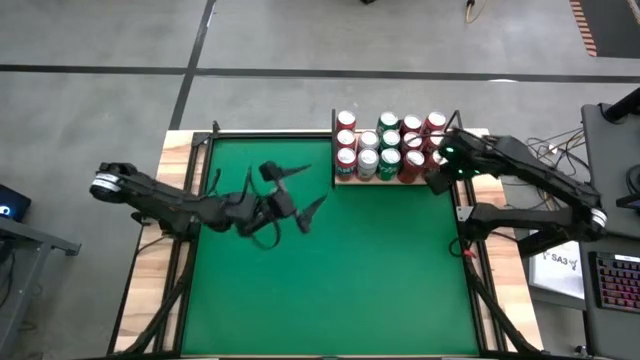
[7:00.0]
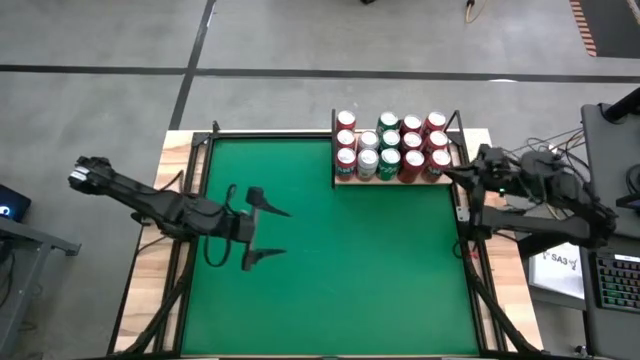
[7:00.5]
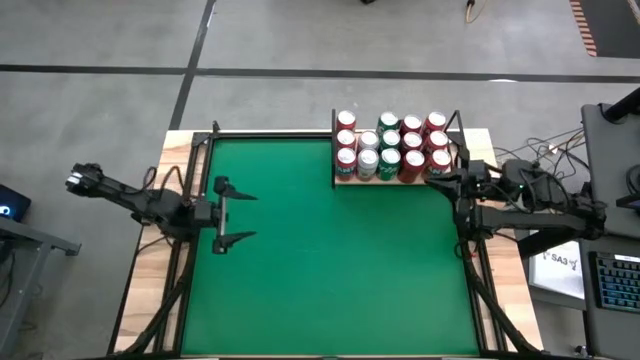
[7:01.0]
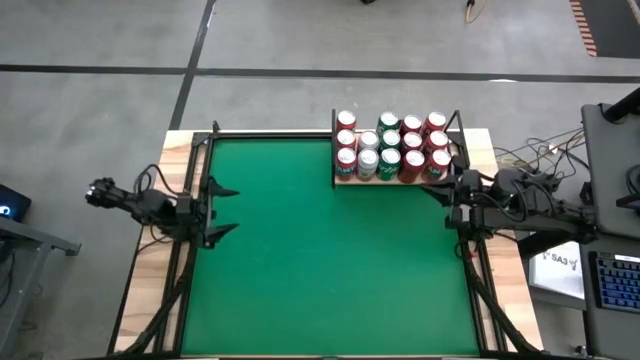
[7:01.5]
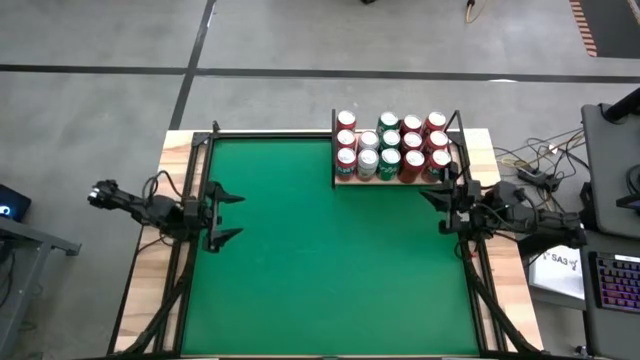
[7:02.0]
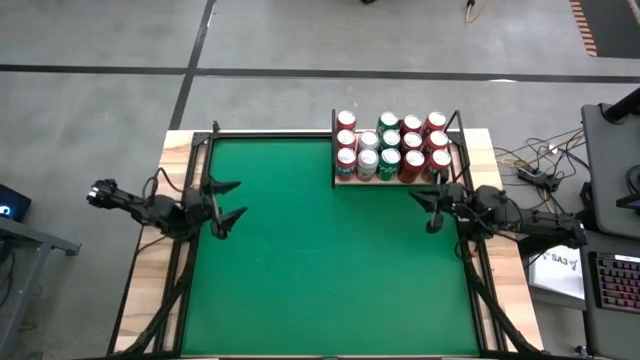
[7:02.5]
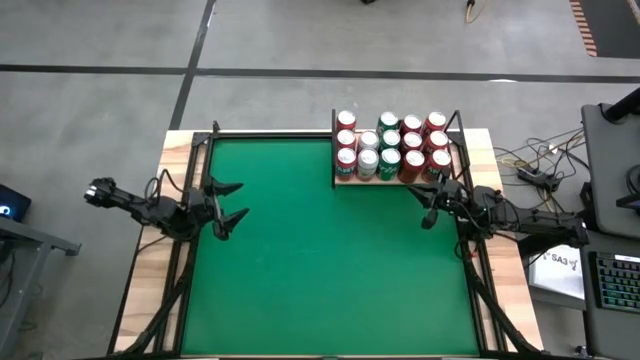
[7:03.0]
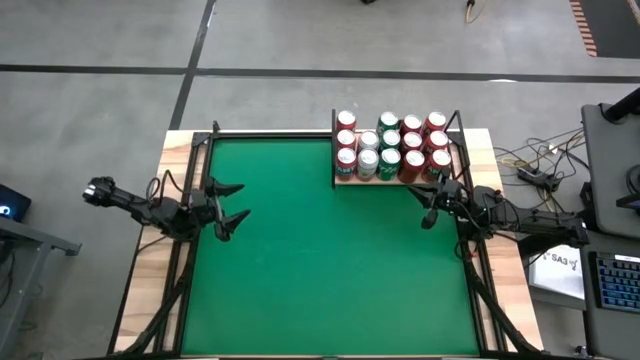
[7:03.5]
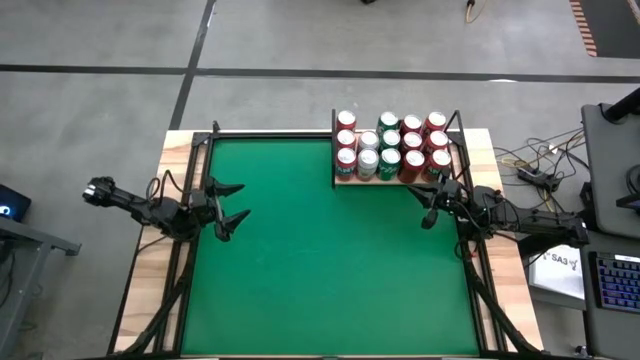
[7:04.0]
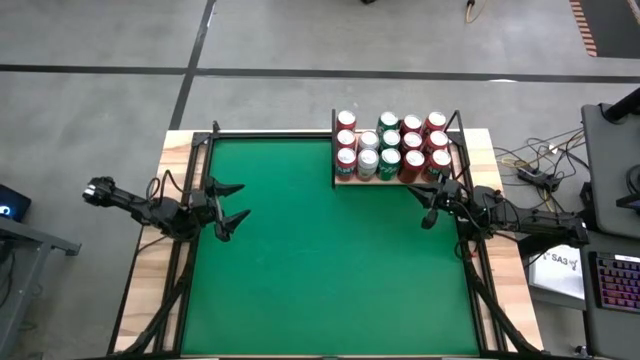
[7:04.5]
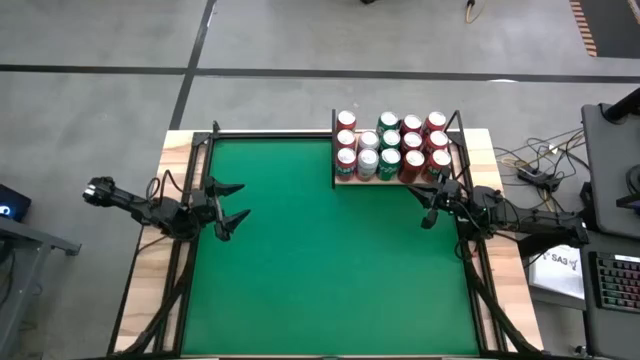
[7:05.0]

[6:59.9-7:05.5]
Task: Place canned beverage on shelf
Return to Home Position

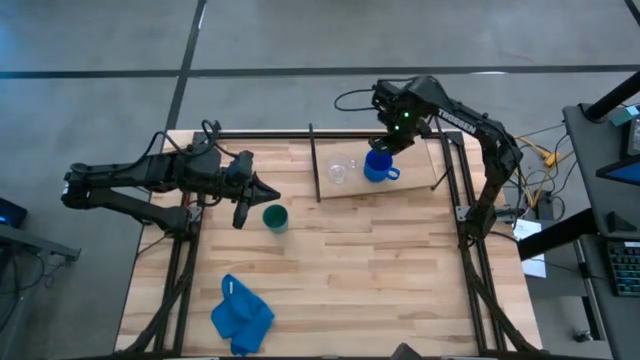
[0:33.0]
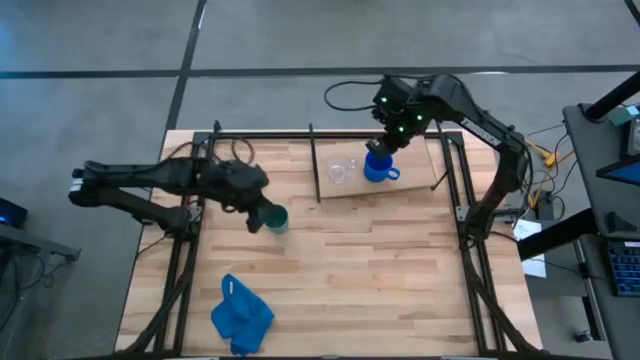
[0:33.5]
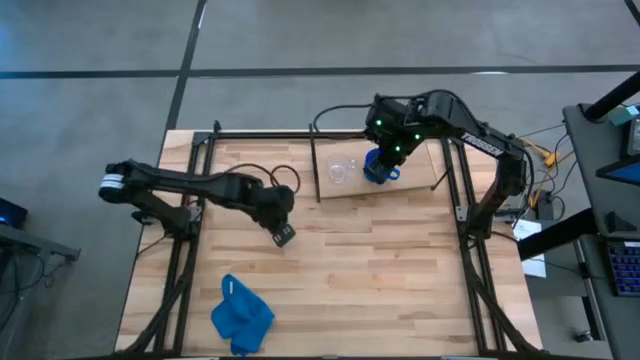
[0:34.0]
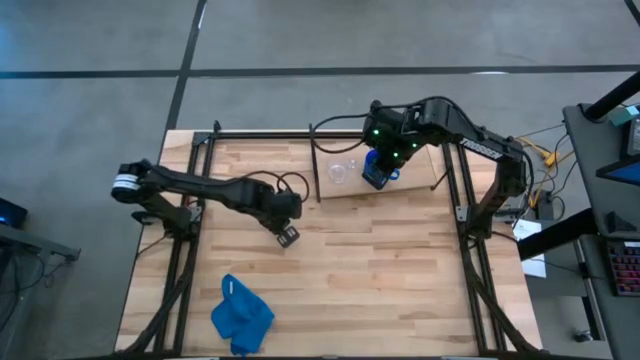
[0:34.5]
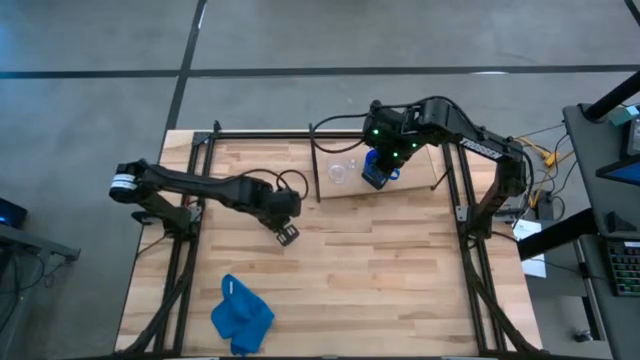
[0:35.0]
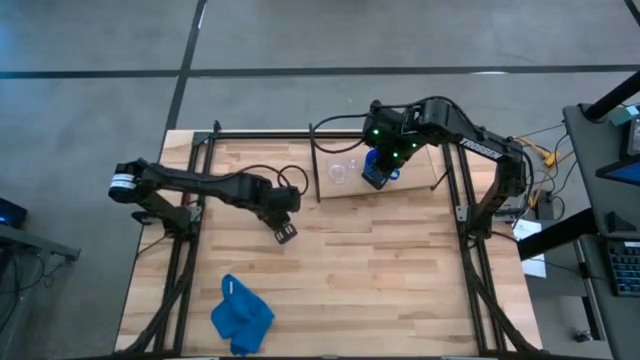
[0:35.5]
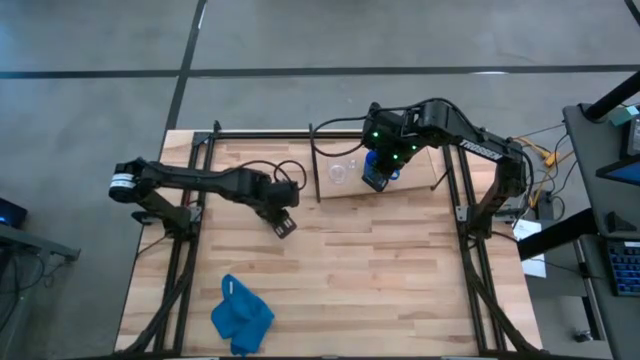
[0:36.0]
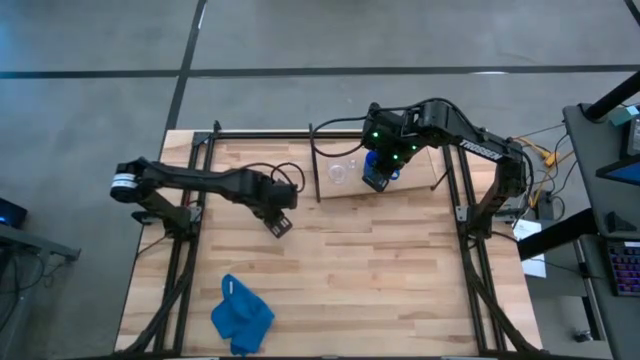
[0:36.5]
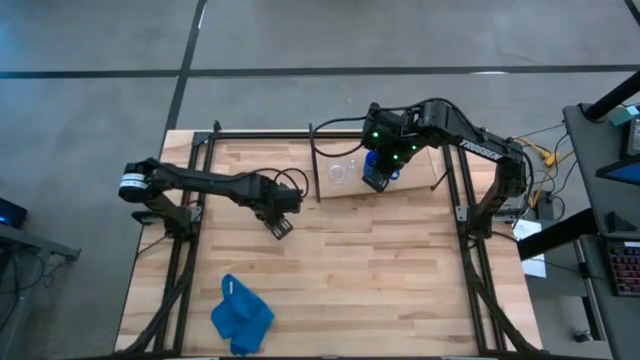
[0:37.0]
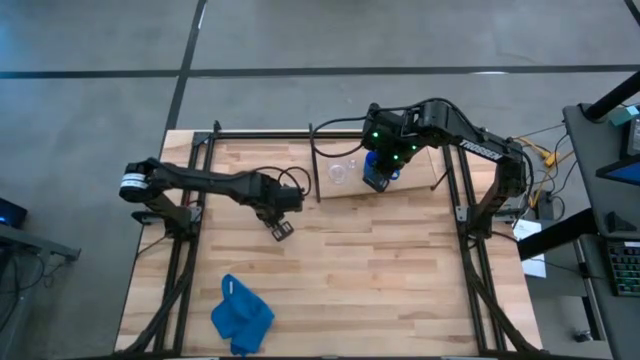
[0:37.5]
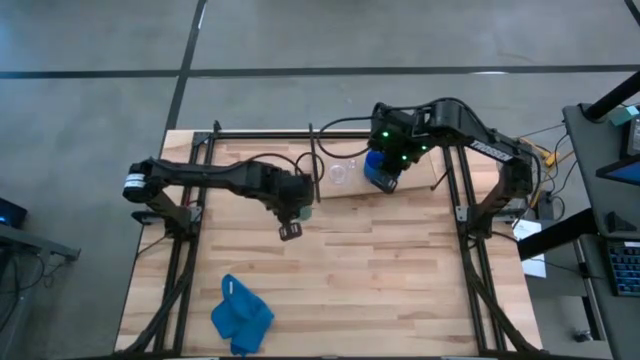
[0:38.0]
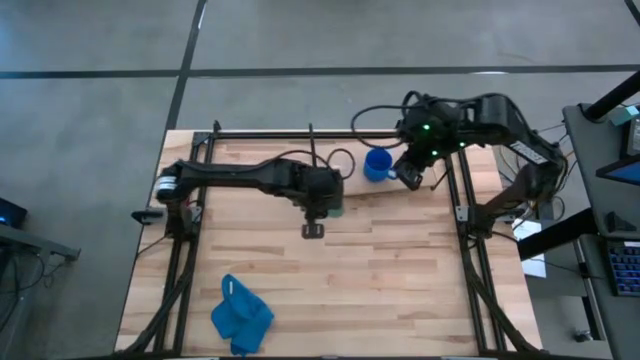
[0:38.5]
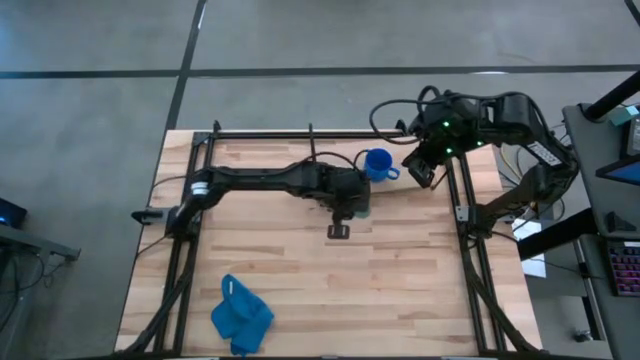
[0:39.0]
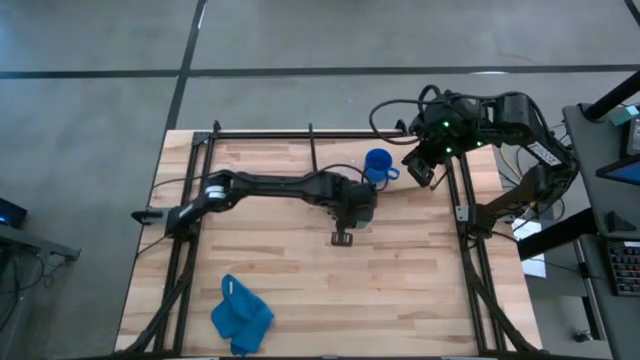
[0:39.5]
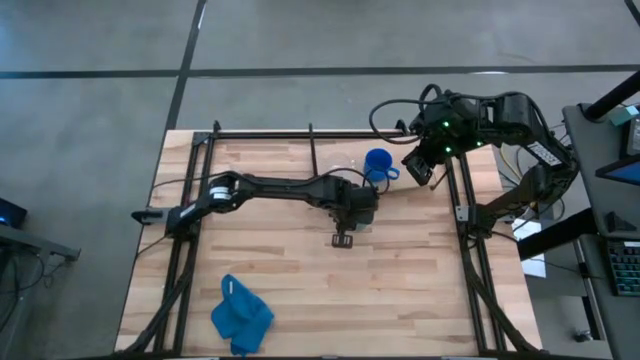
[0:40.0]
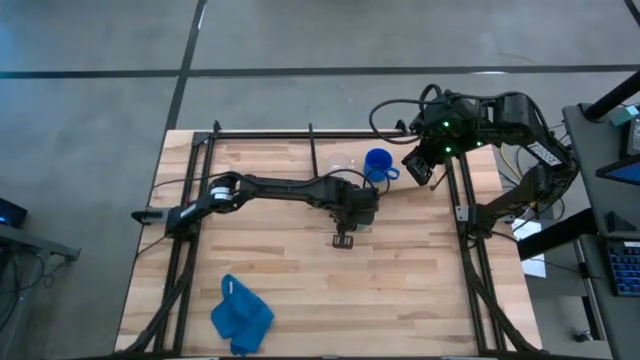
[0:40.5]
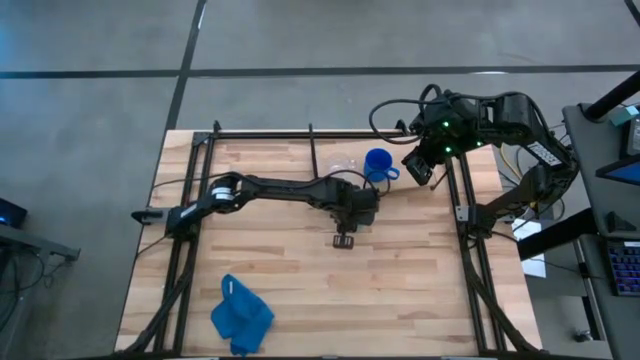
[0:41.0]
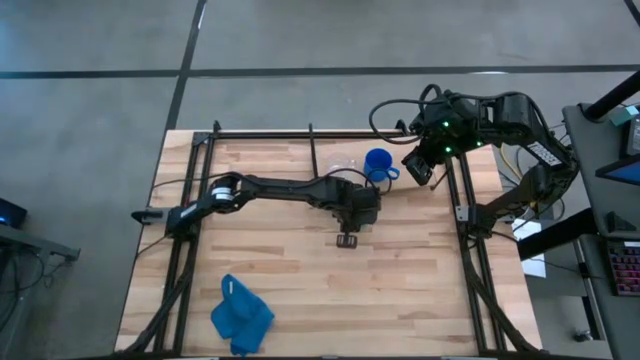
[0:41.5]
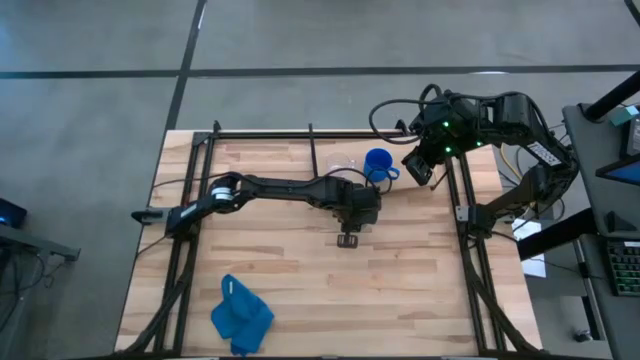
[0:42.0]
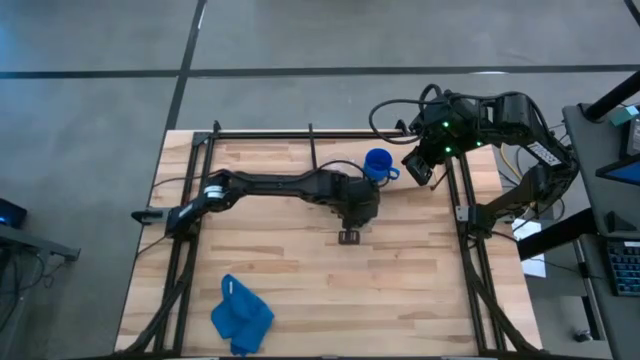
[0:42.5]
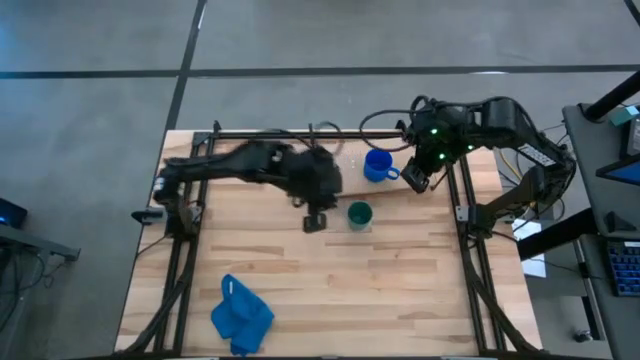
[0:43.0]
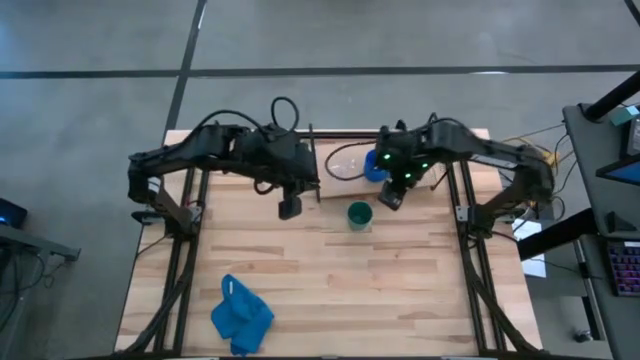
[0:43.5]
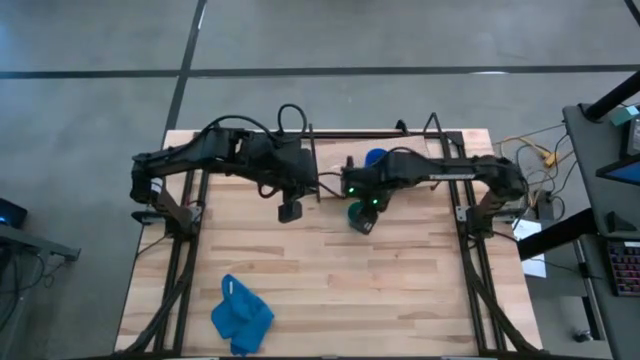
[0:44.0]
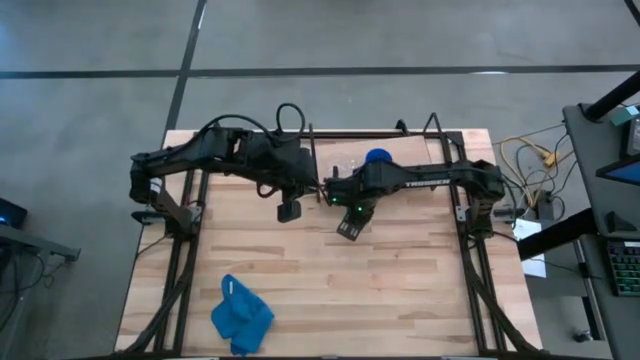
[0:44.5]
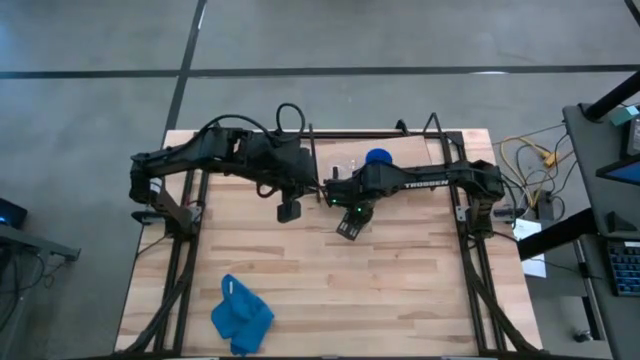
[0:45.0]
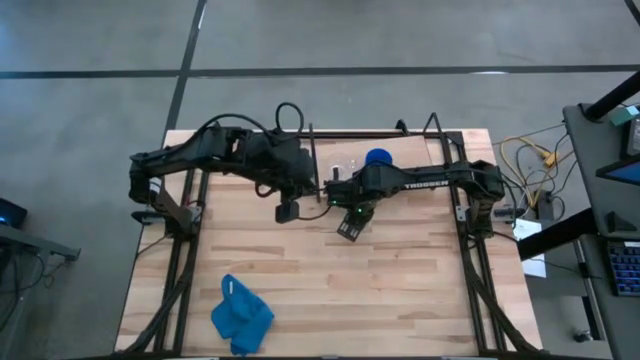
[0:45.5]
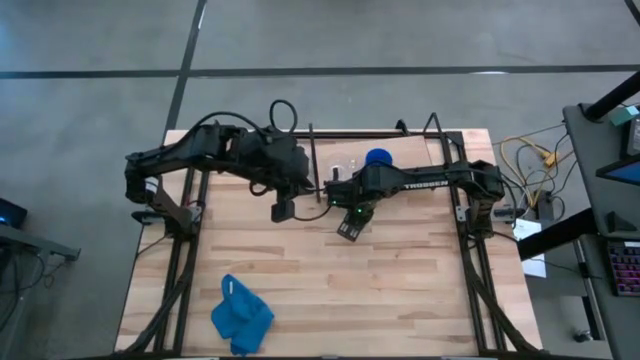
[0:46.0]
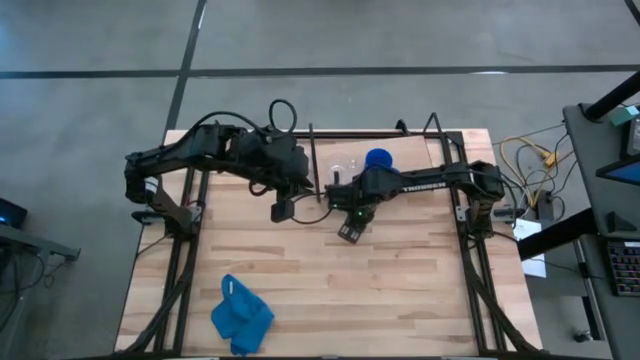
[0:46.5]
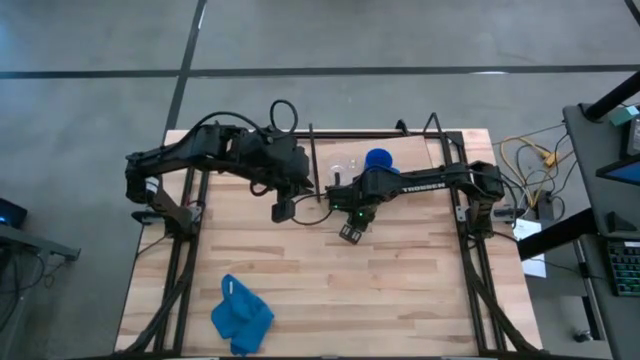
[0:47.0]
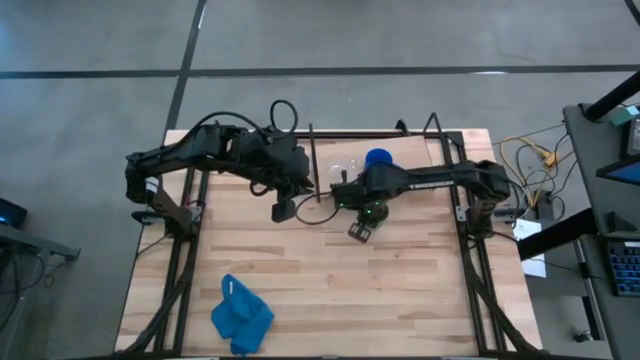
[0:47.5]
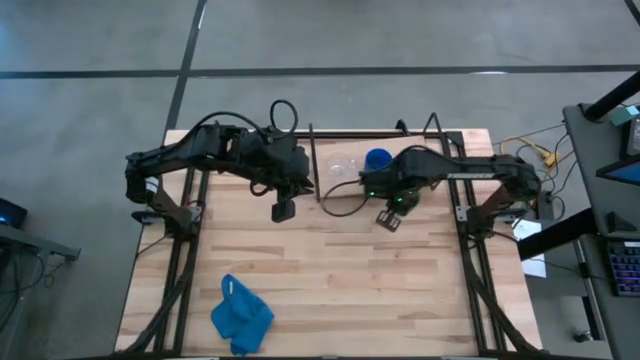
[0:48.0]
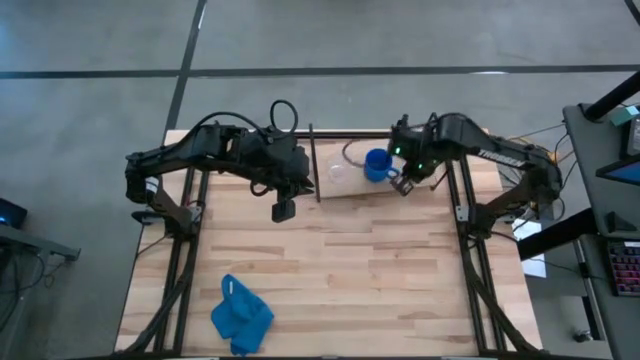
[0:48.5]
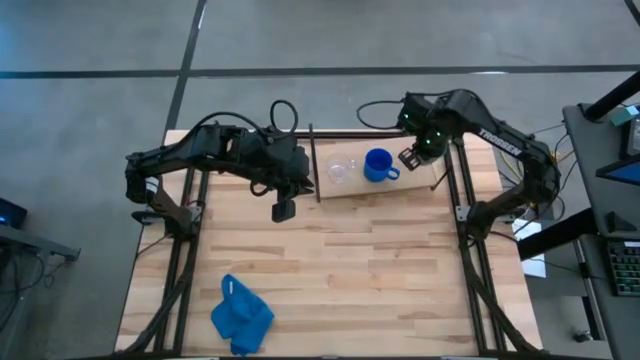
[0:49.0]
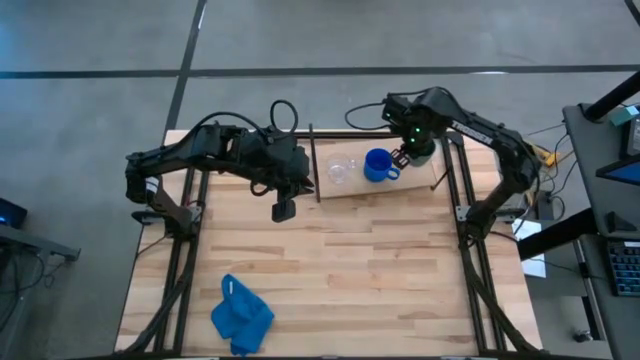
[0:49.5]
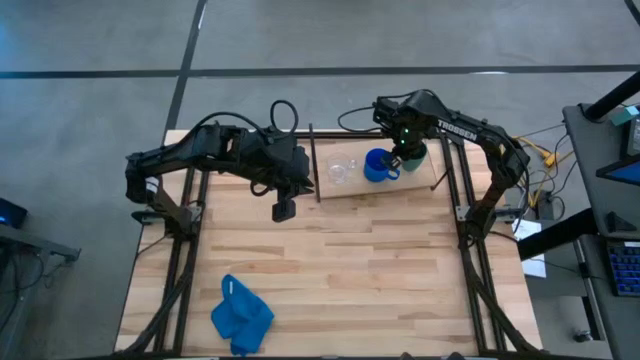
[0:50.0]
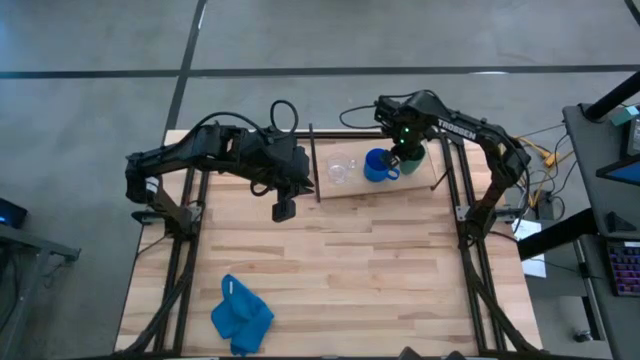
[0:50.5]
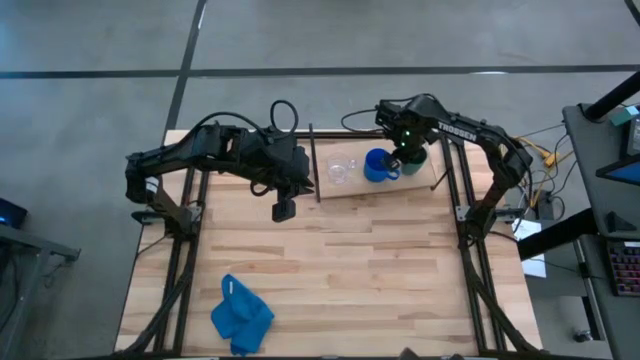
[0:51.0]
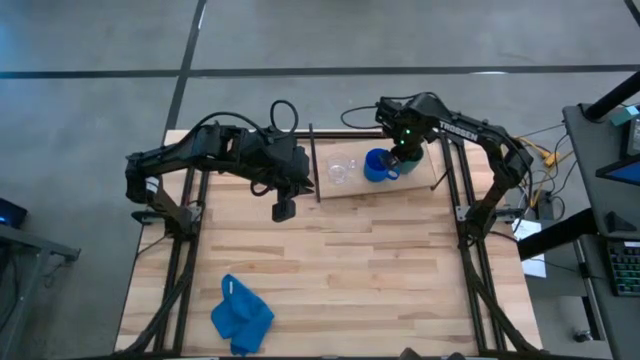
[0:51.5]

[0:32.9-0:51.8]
Task: Stack small to large cups/mugs on shelf
Put the green cup on the shelf
